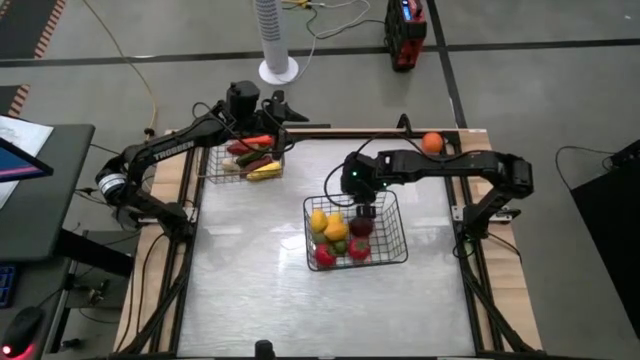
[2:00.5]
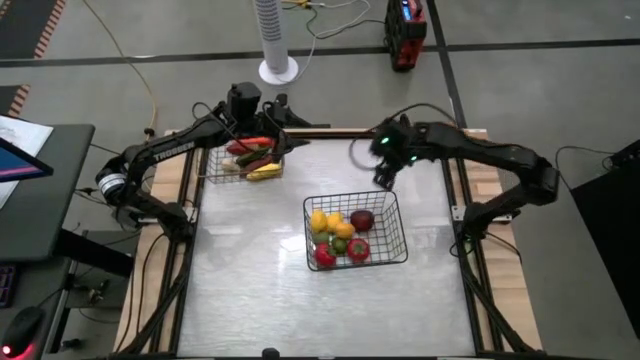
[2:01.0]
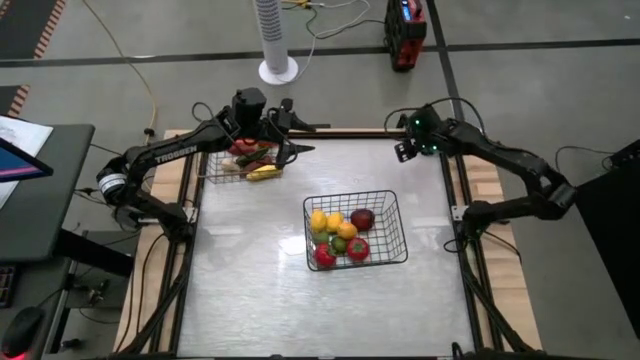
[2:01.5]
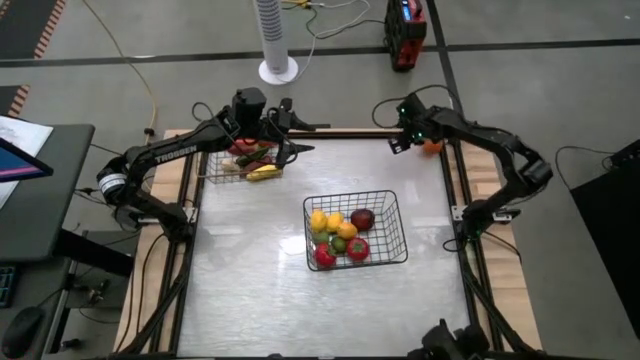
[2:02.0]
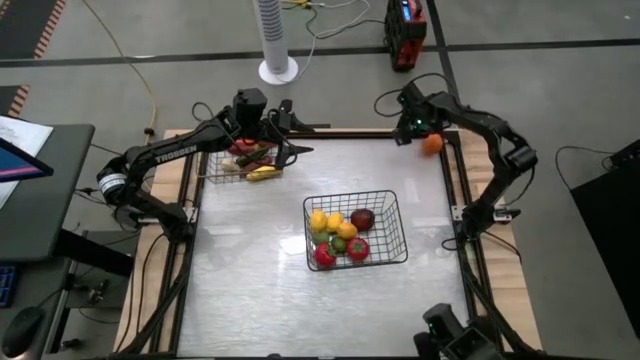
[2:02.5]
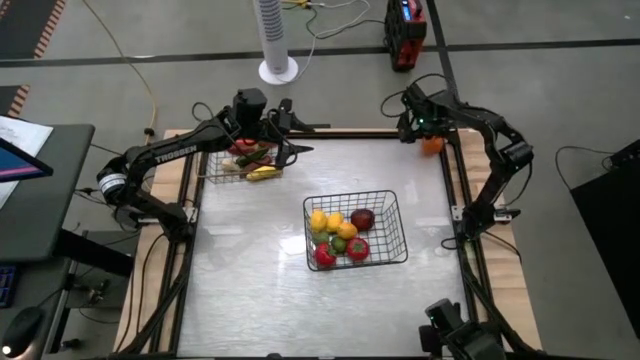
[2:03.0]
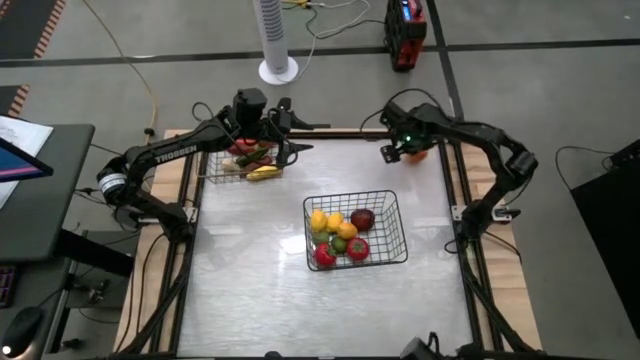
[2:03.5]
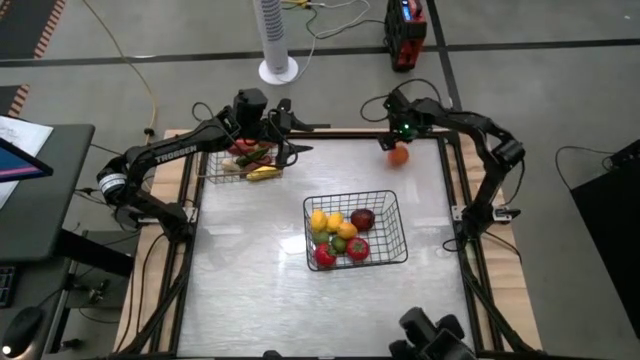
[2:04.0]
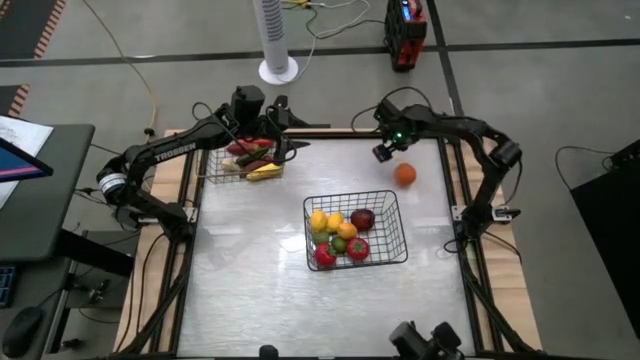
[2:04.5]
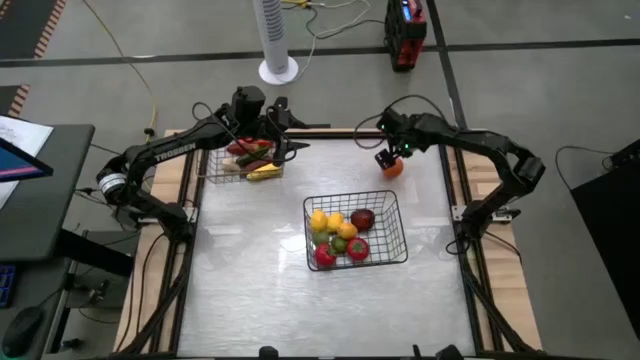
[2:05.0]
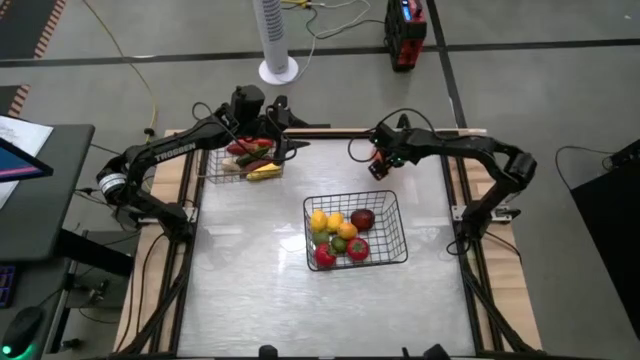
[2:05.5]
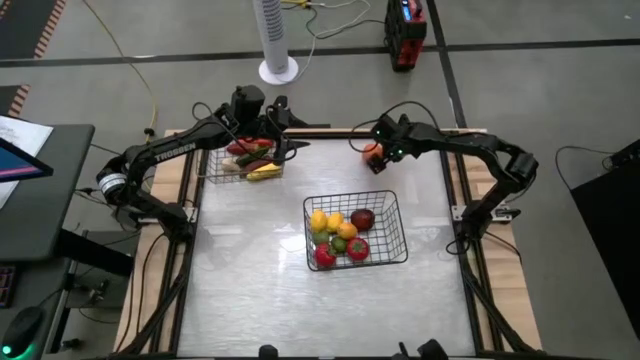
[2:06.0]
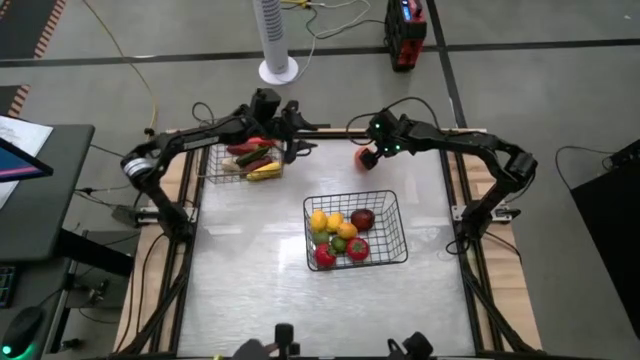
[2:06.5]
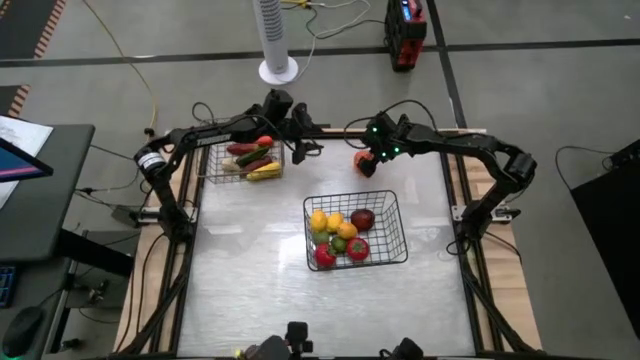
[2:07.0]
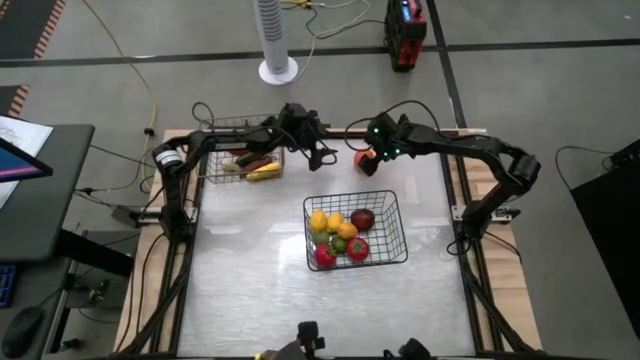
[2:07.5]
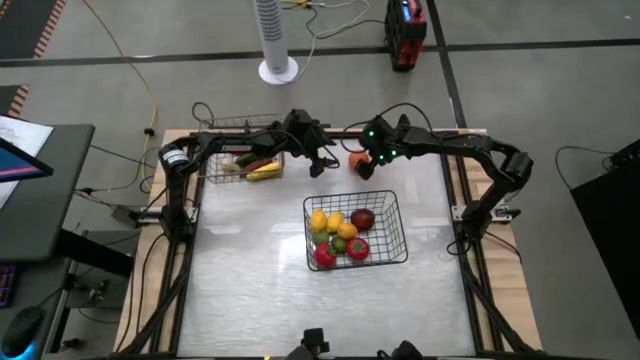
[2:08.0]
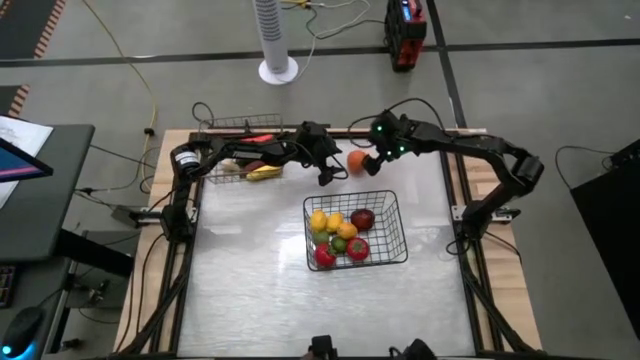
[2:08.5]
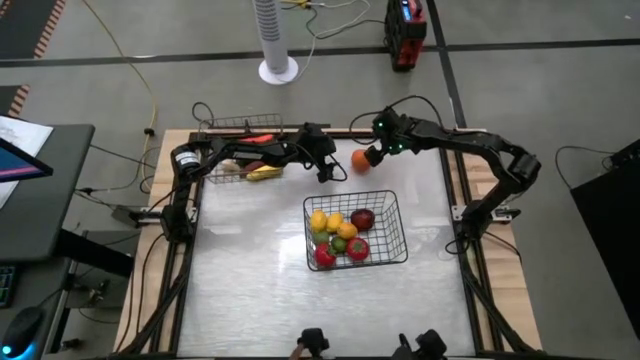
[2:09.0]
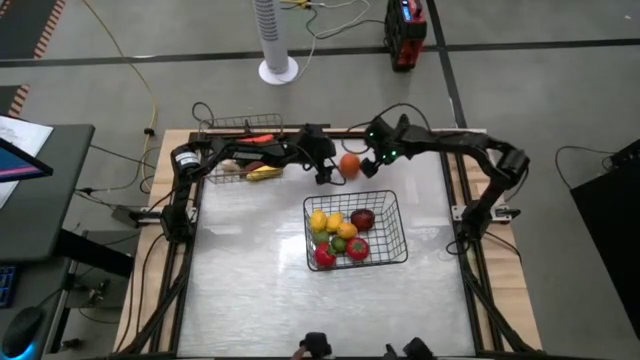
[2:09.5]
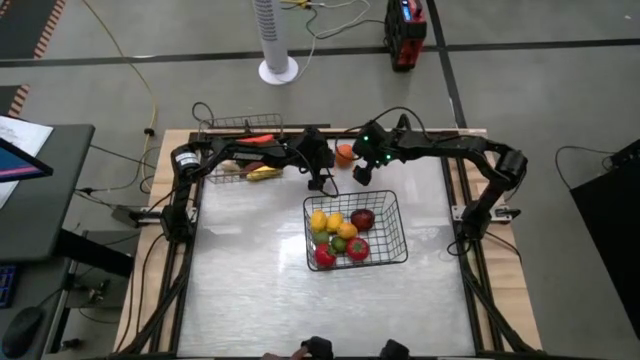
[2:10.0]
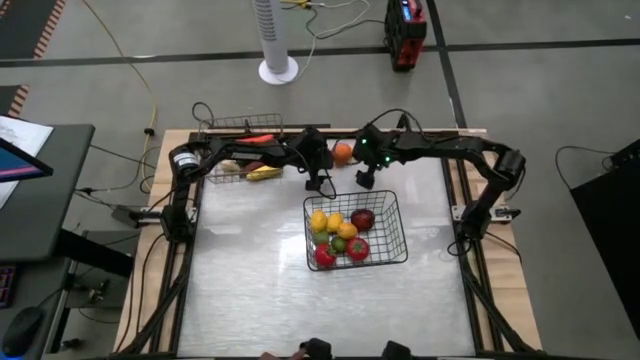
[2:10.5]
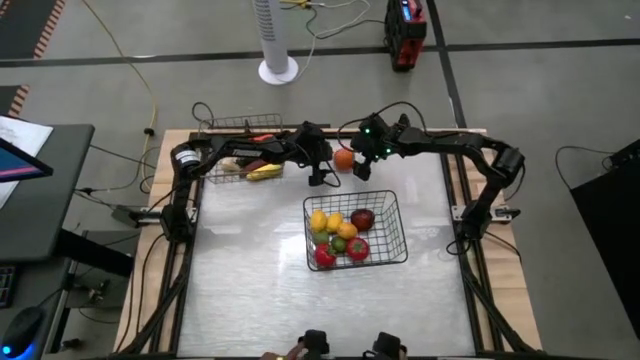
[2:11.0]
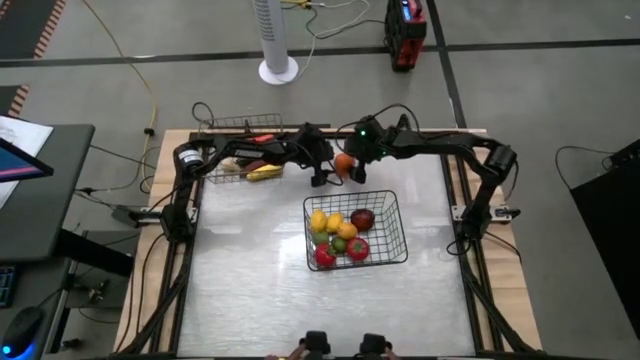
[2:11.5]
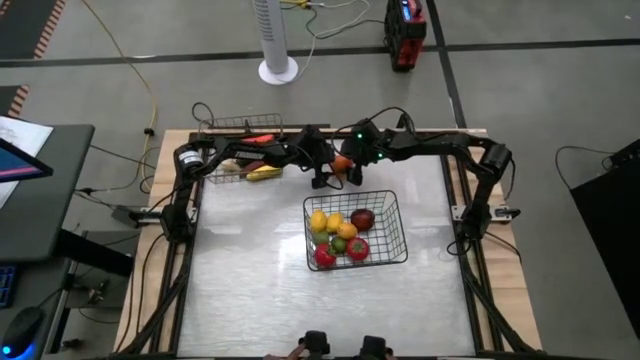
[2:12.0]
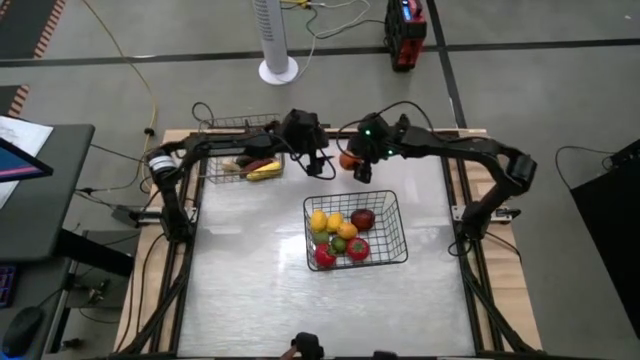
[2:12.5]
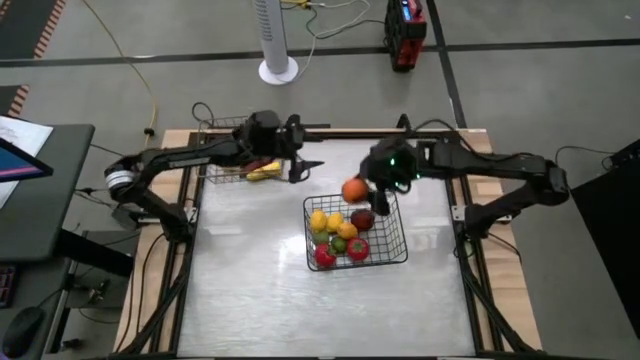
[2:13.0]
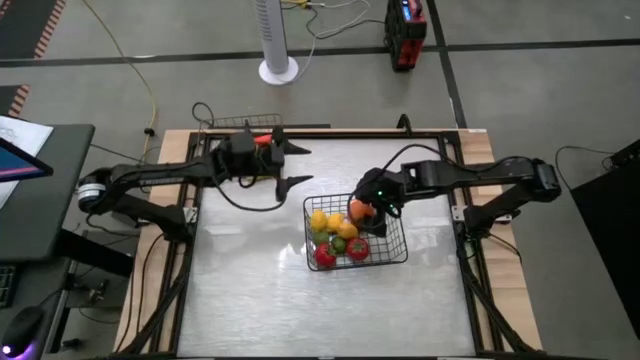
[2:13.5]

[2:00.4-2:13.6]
Task: Sort produce into baskets
Put the orange into the bottom wire basket

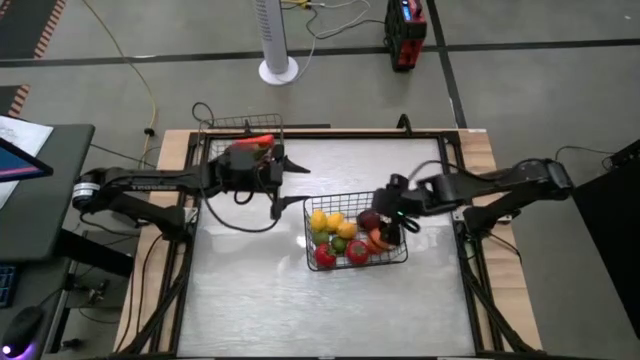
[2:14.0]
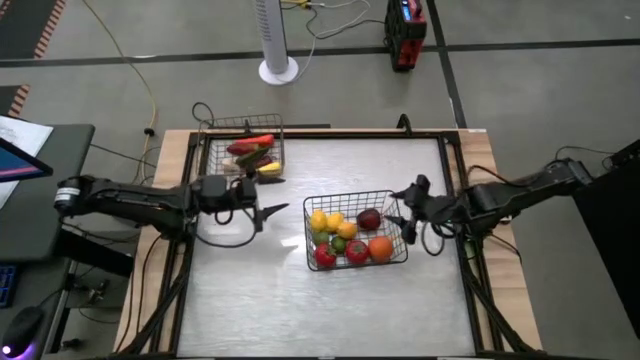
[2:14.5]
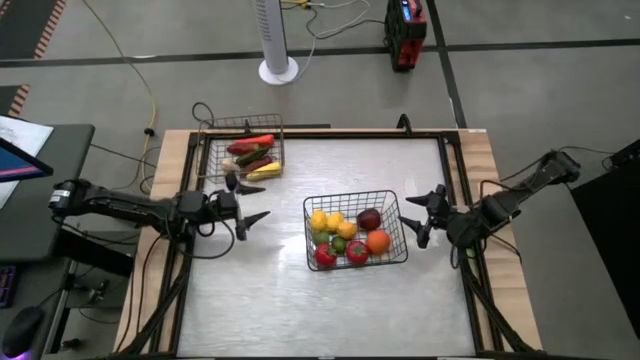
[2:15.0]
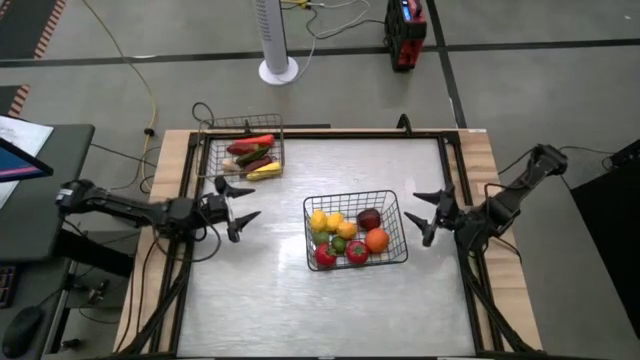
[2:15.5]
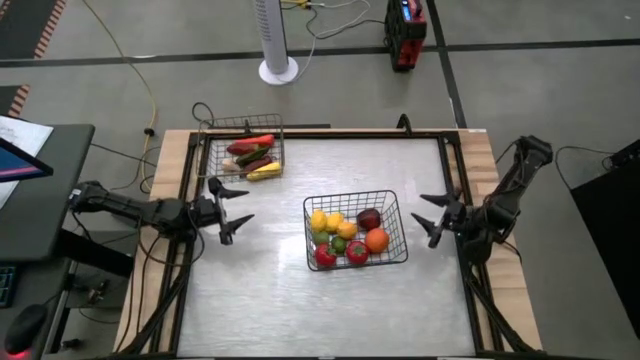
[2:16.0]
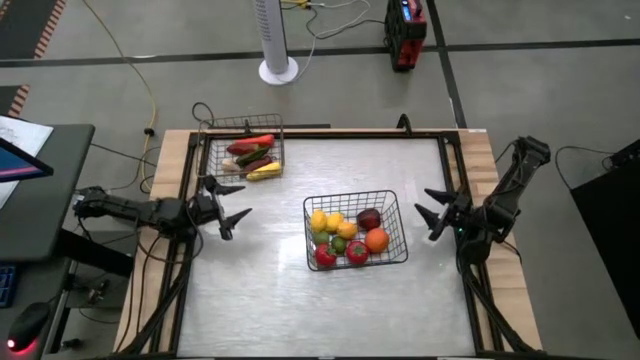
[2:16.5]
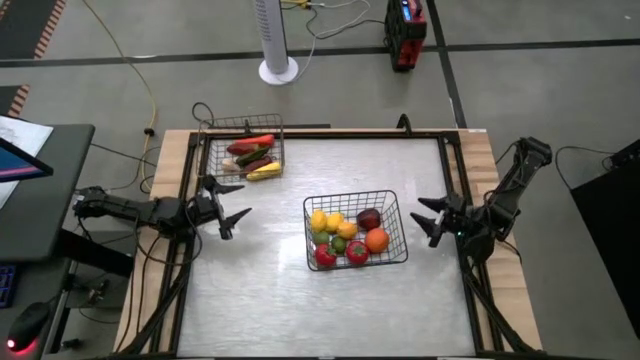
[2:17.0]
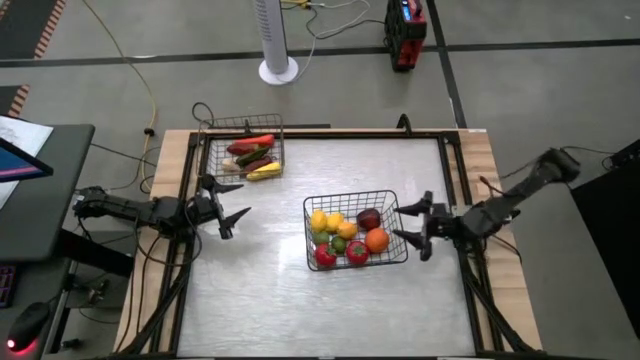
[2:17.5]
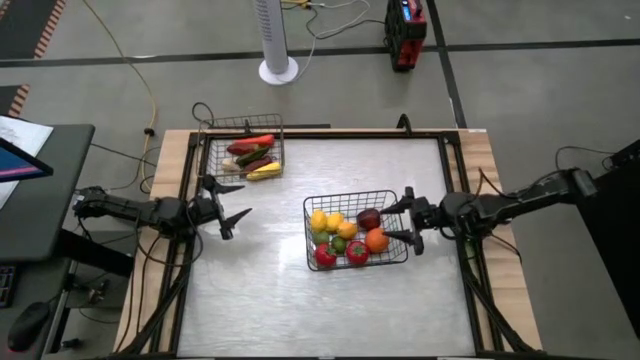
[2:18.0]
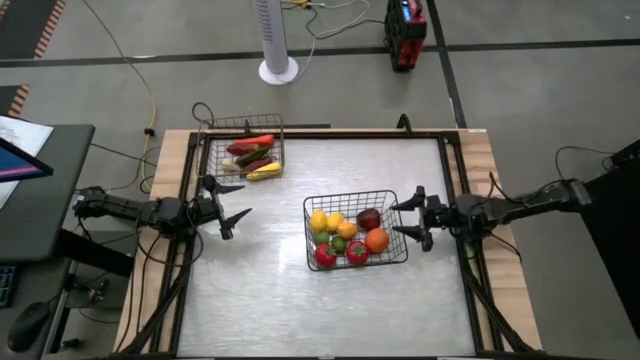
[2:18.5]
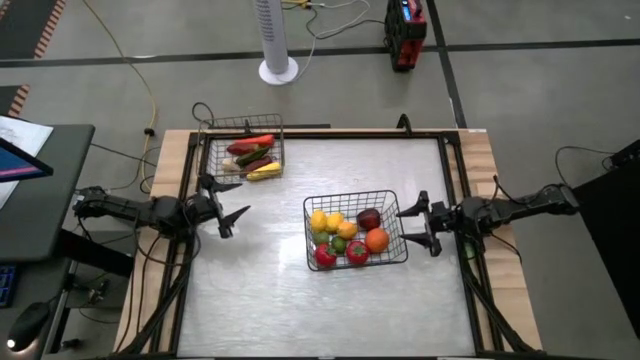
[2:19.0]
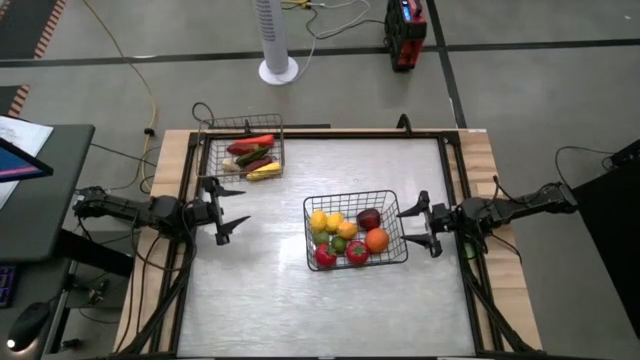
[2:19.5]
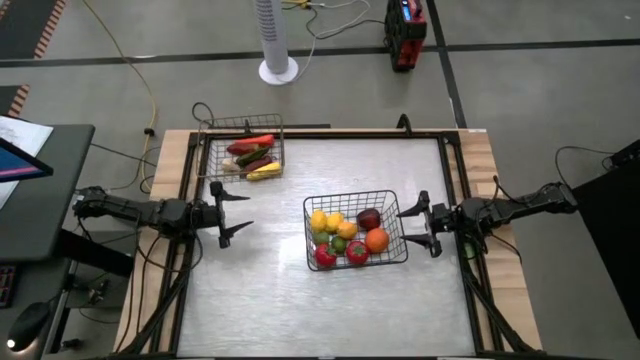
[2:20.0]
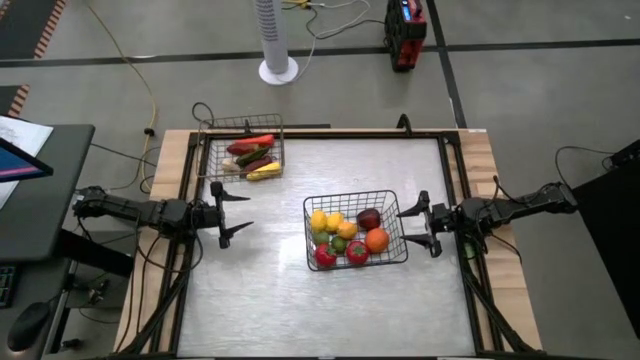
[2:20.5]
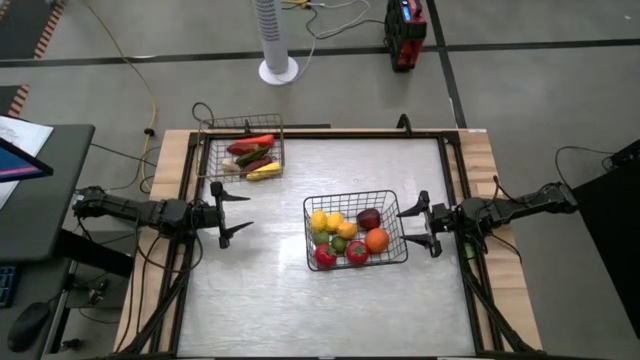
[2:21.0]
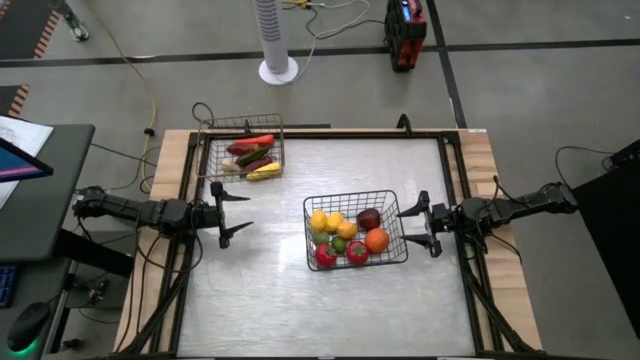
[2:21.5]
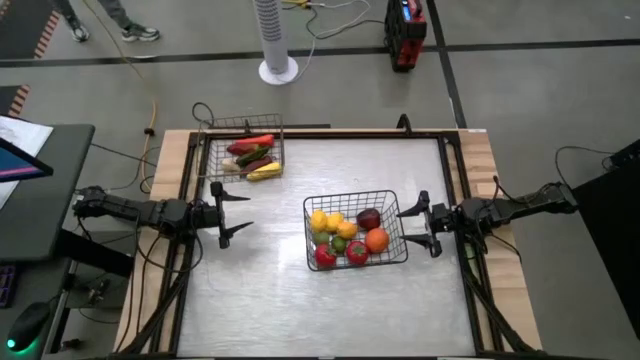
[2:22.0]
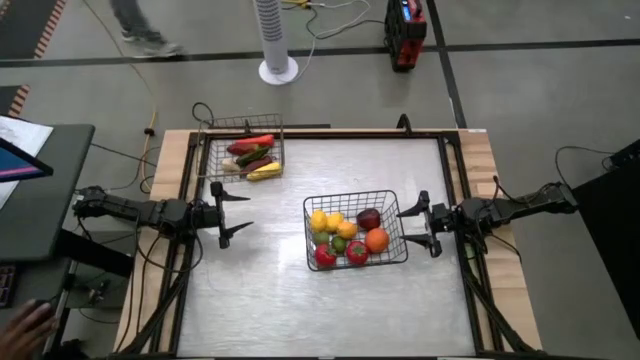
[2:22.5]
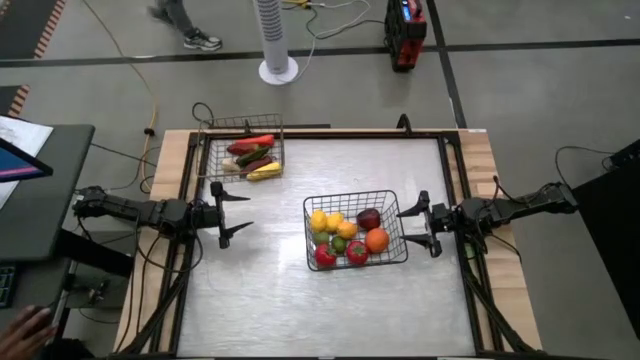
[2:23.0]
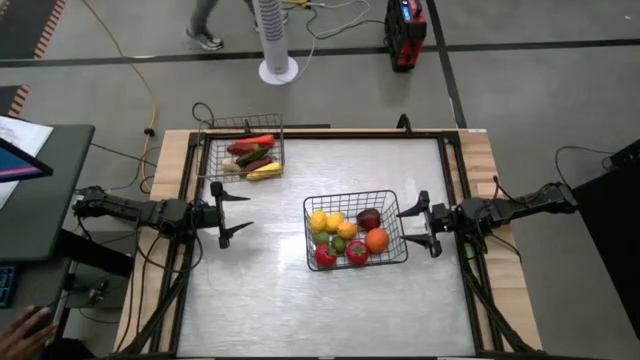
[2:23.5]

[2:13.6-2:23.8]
Return to Home Position
